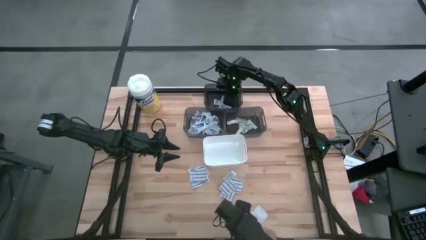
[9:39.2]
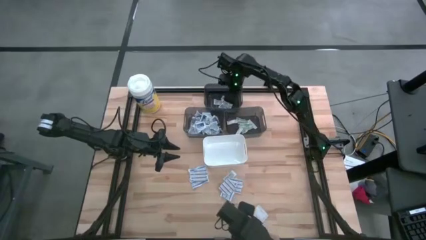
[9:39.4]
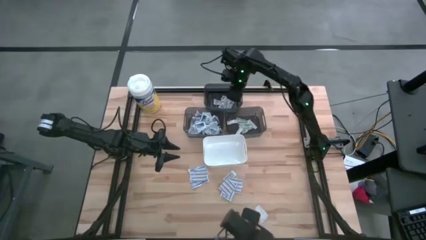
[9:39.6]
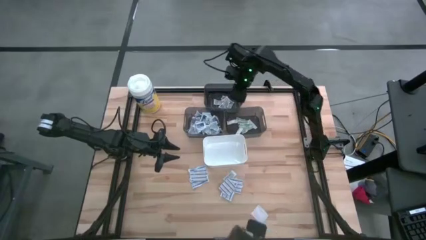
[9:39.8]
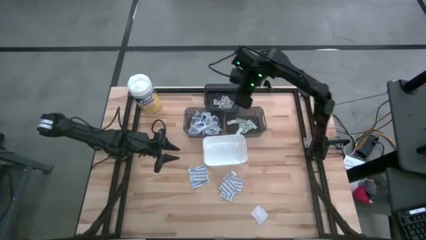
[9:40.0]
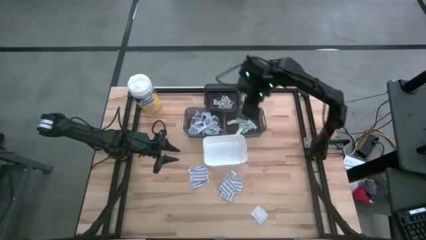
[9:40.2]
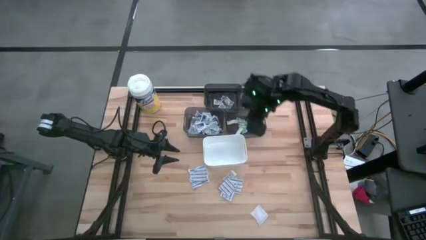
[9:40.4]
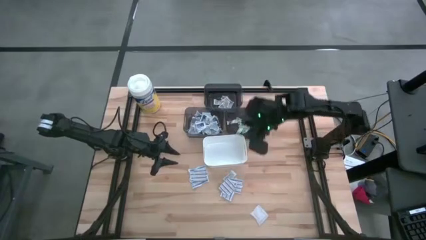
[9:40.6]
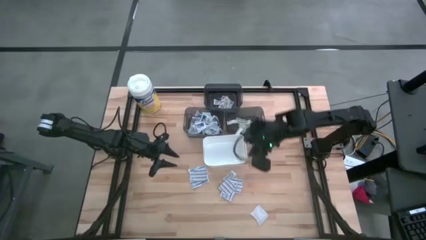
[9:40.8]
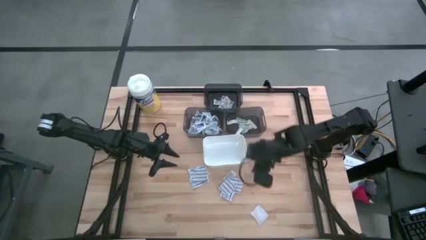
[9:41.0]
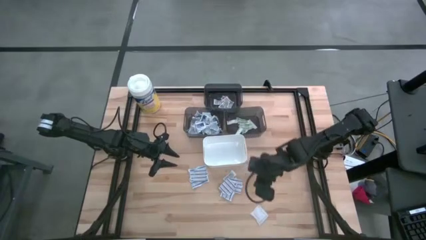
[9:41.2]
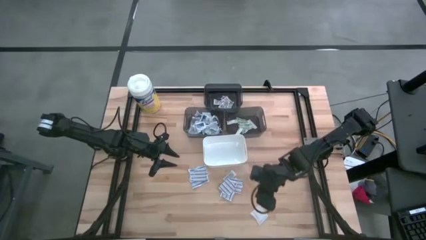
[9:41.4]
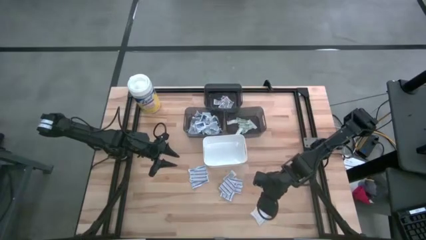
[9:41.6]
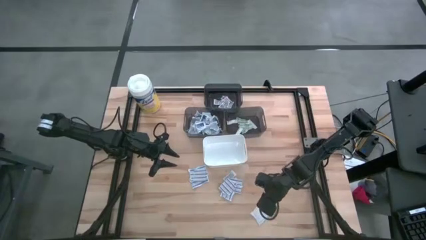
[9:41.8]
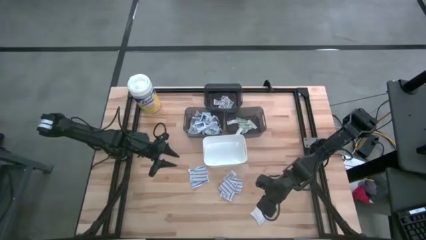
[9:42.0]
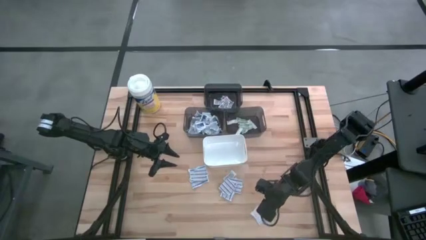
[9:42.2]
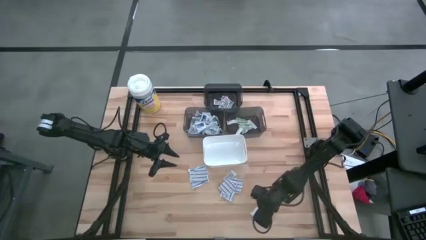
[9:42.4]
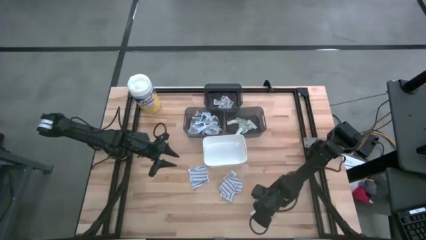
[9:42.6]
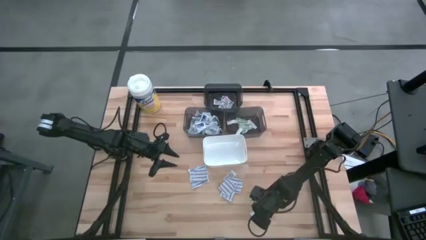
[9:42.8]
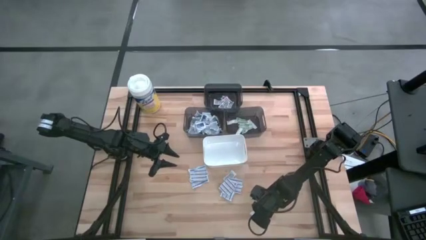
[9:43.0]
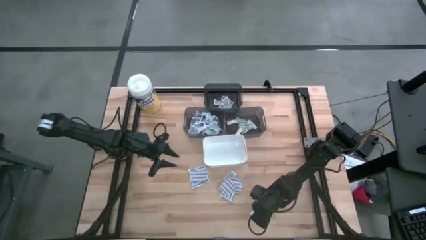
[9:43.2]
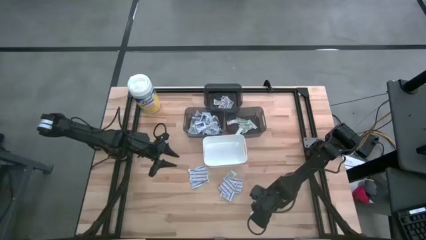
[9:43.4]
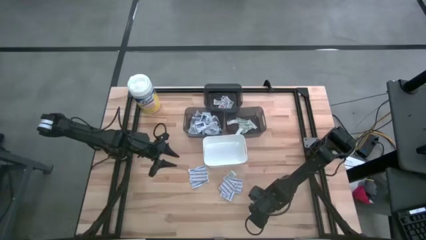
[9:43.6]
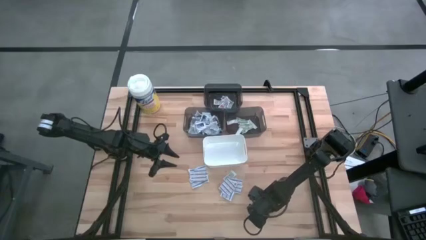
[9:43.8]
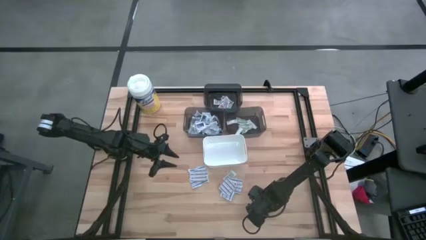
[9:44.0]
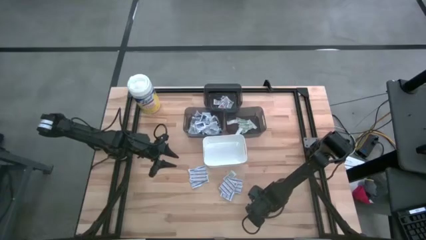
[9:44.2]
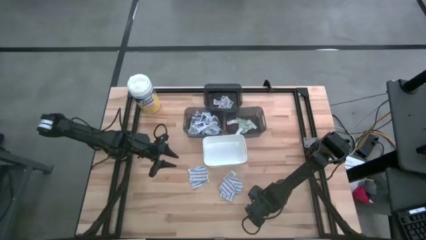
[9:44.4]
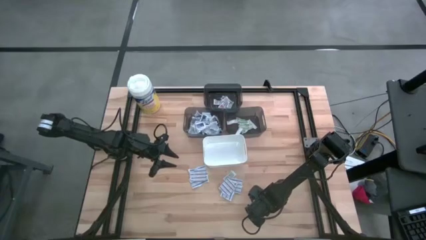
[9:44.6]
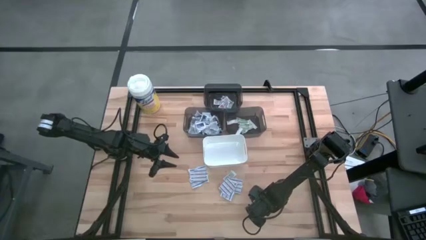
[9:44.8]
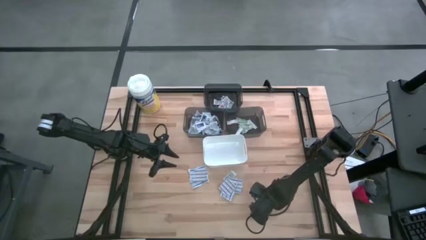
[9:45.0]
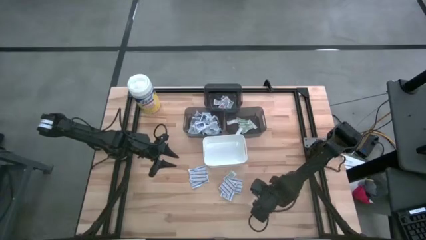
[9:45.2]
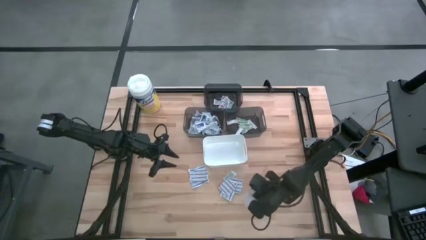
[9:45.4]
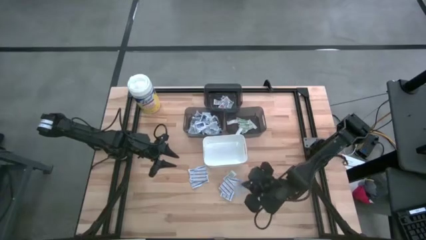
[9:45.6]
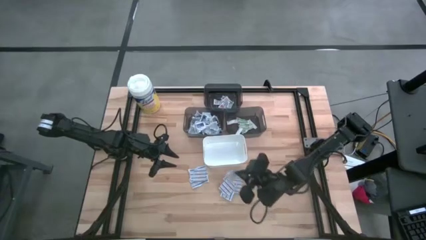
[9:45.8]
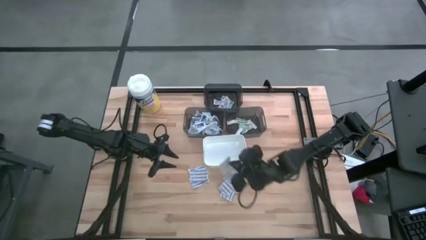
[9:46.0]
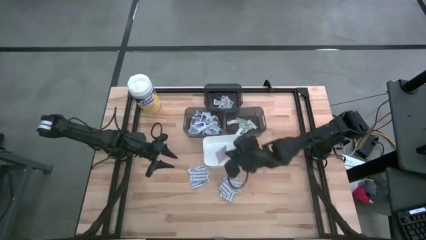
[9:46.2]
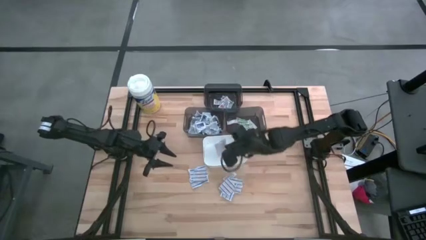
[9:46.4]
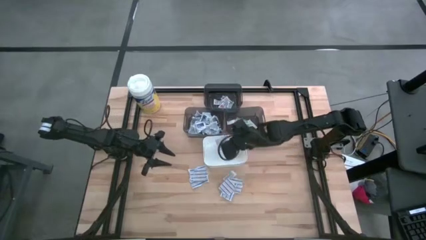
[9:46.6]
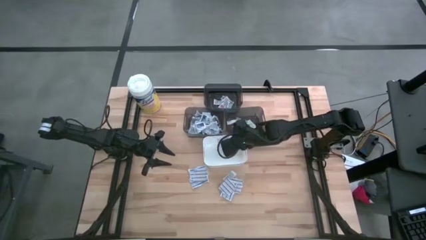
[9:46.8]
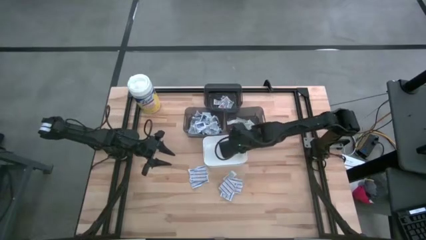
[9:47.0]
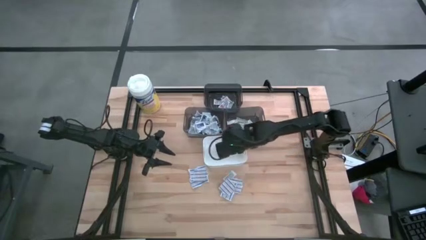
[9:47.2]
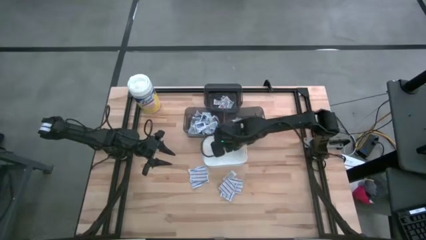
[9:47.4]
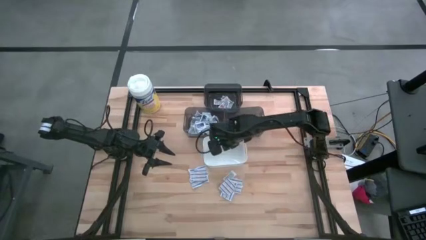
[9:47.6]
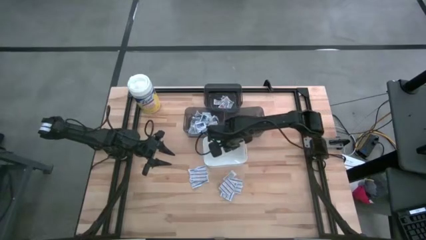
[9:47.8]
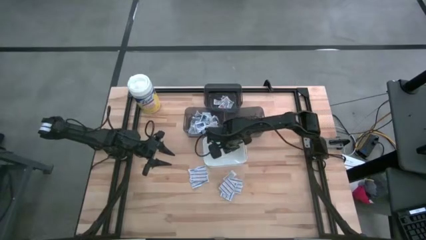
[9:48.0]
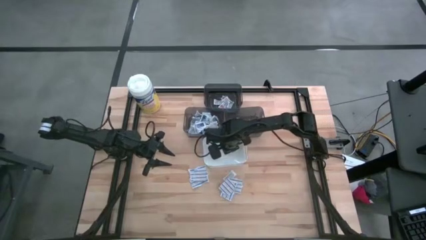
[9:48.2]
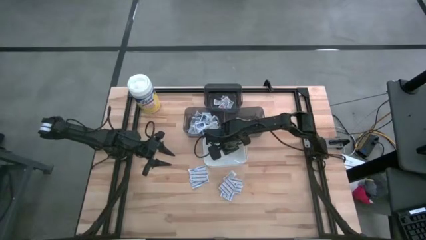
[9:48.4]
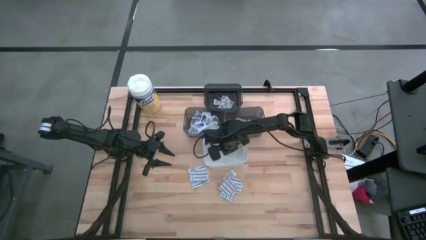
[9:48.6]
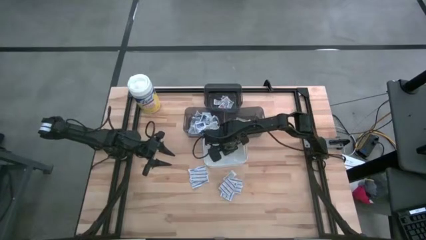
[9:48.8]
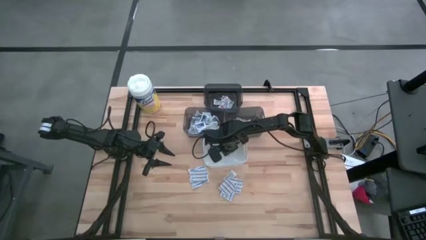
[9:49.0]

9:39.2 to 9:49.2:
Task: Pick & Place First Aid Supplies
Put the blue bandage into the white bin

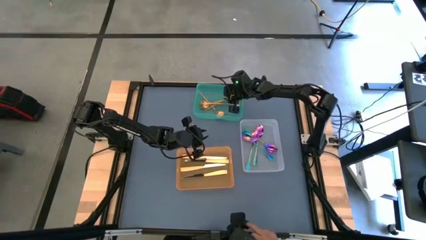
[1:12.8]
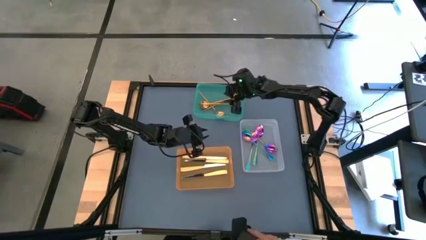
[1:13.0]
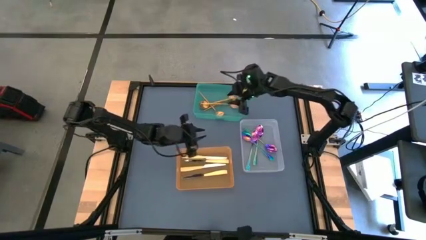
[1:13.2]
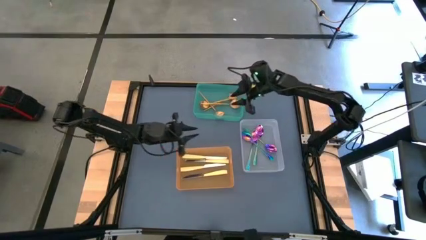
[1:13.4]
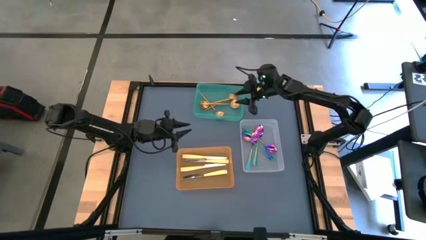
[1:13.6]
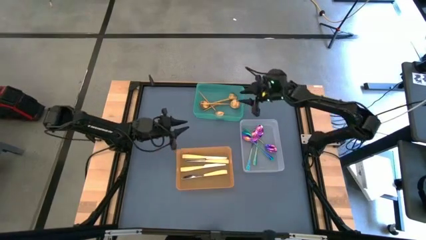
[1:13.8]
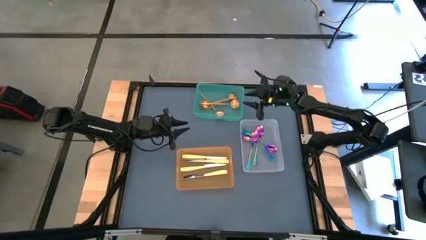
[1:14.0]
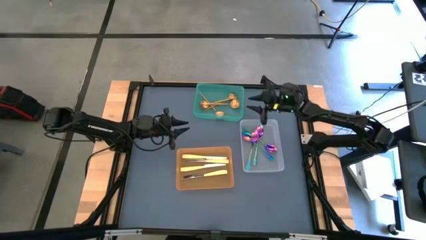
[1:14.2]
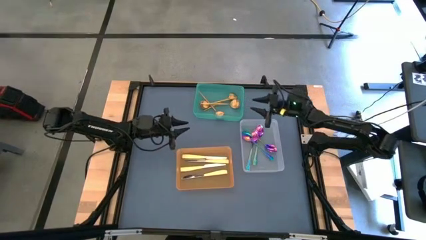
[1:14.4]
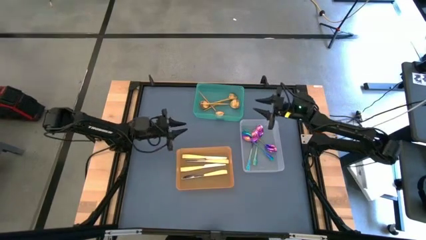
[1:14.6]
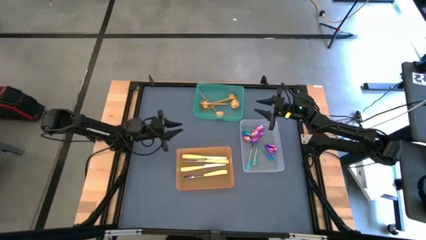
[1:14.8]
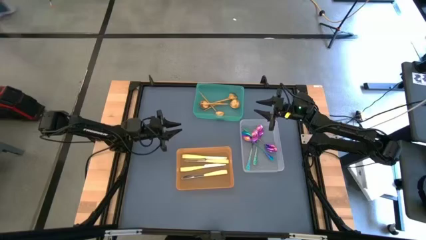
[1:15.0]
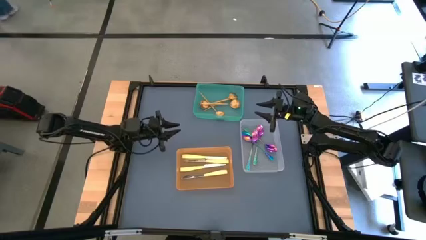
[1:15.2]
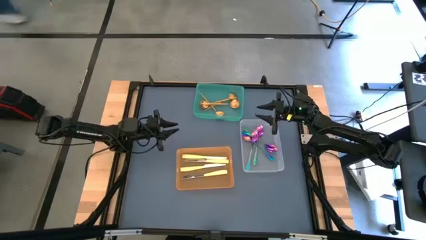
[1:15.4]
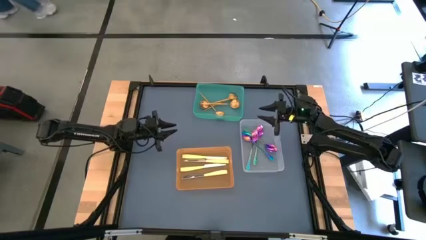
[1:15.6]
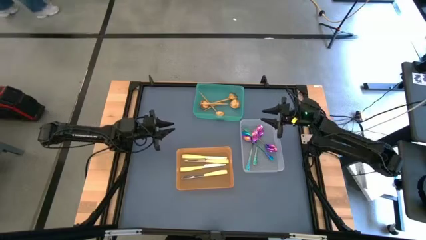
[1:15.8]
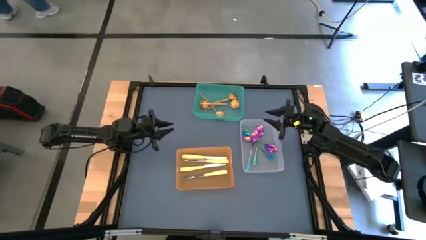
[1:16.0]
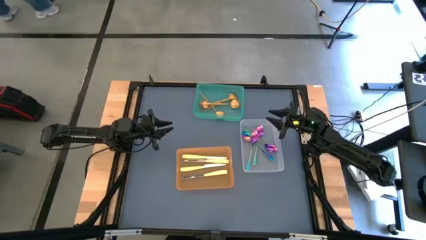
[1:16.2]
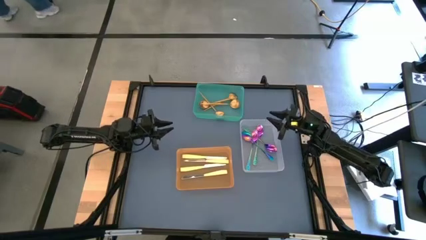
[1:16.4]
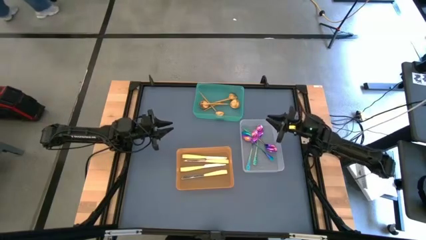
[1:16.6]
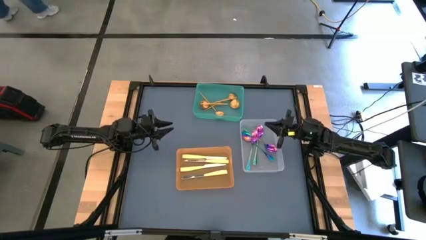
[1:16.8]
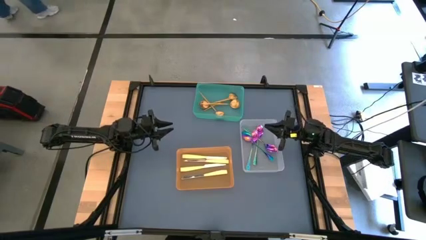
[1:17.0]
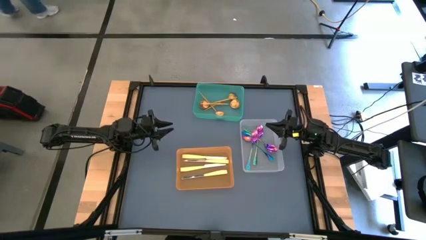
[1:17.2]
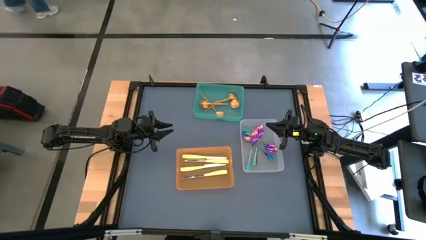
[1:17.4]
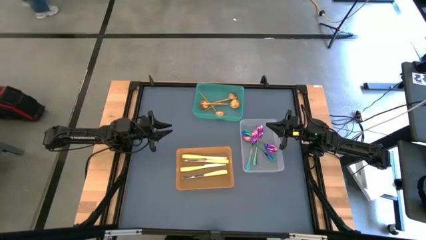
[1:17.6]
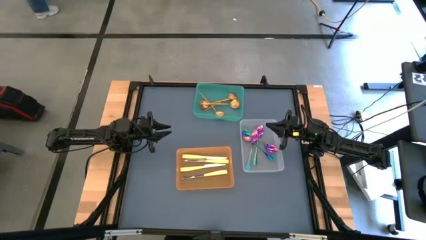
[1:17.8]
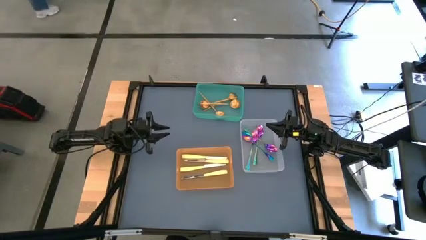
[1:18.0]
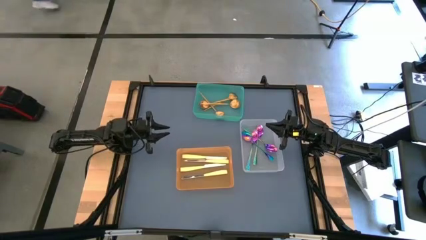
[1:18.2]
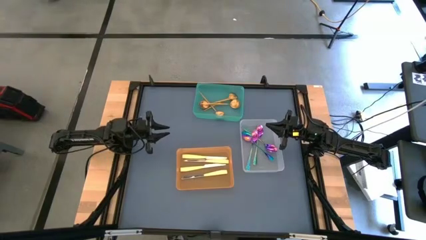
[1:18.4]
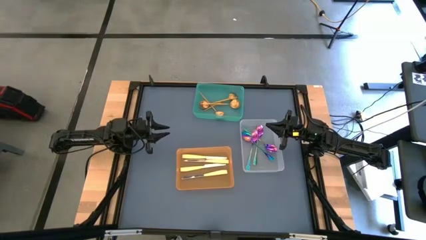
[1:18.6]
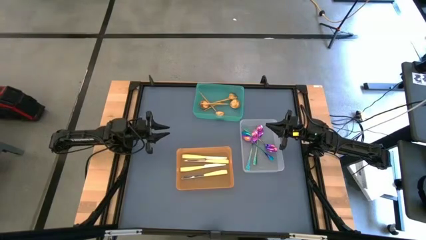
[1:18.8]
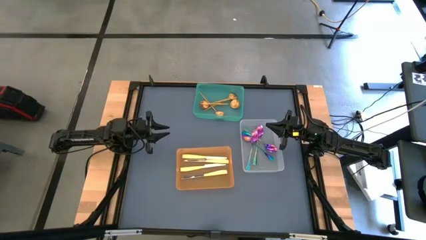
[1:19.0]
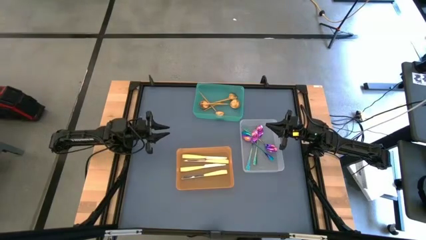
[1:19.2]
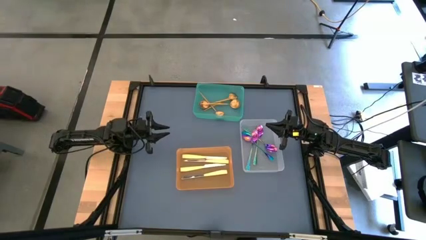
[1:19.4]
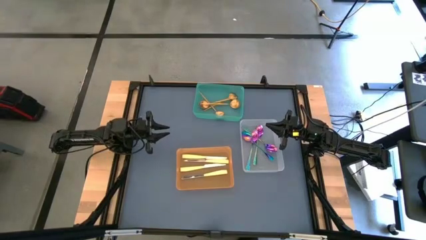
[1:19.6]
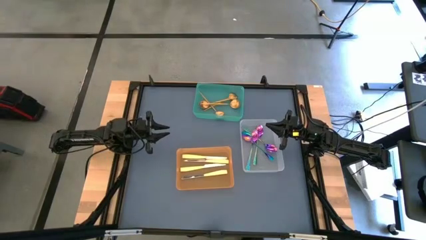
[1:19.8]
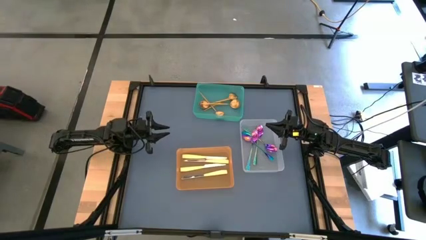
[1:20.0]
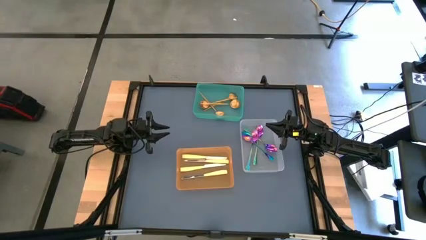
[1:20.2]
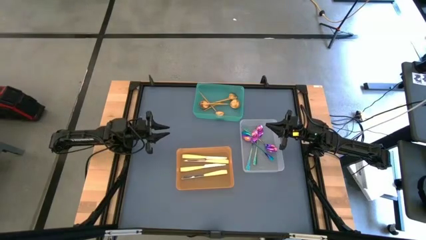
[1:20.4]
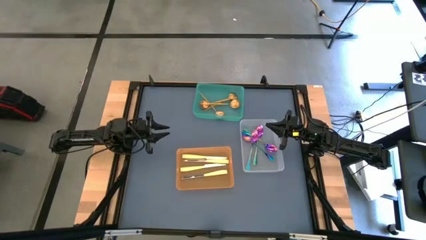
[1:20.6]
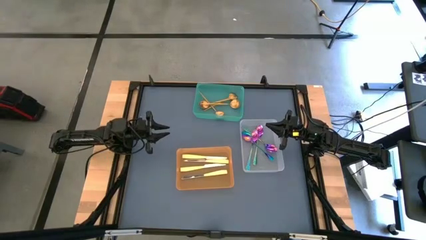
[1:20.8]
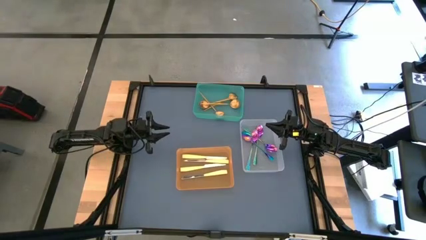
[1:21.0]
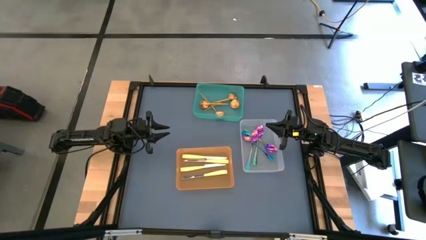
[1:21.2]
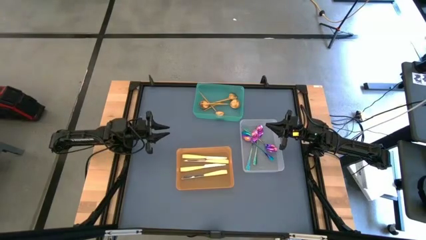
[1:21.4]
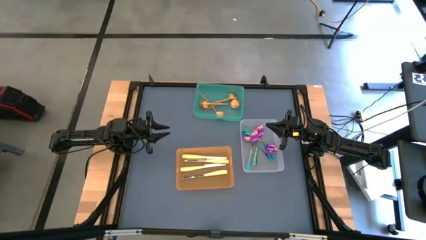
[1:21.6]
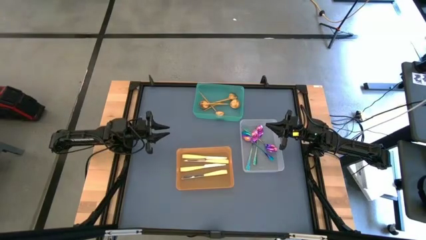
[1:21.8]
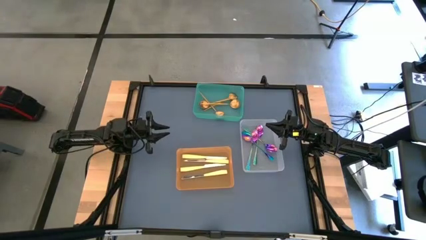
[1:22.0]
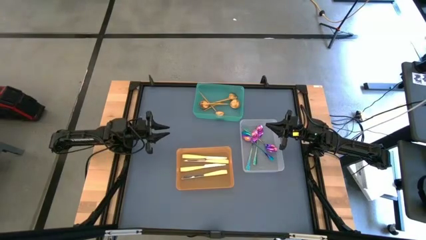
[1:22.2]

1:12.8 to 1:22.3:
Task: Sort silverware by color (type)
Return to Home Position
